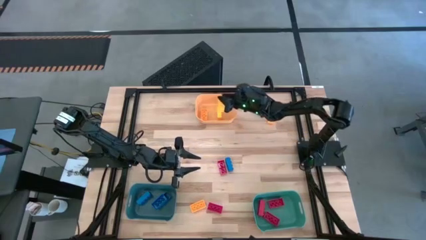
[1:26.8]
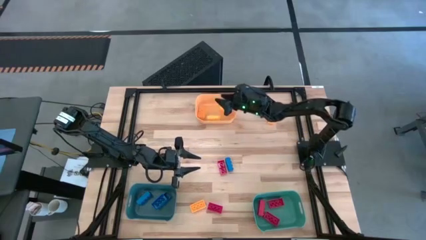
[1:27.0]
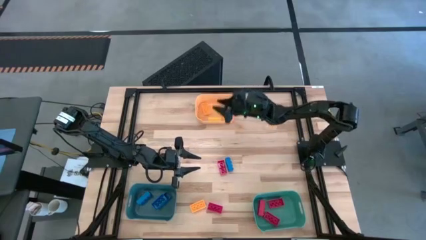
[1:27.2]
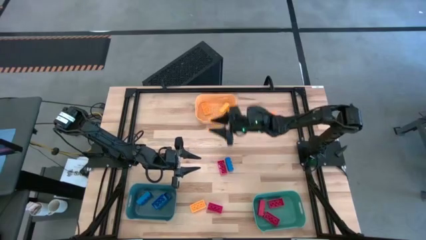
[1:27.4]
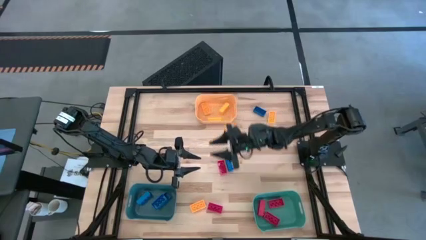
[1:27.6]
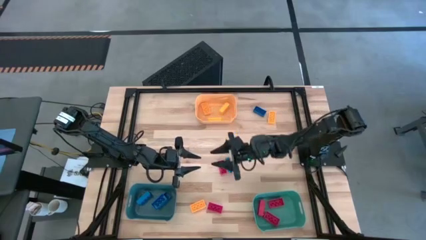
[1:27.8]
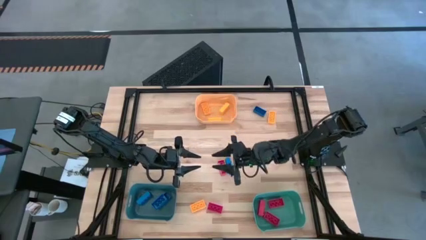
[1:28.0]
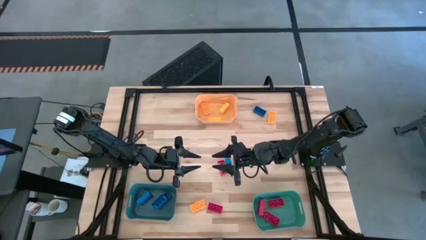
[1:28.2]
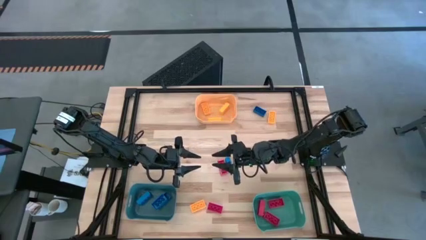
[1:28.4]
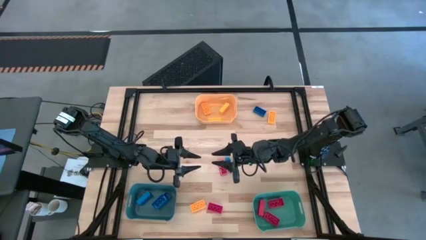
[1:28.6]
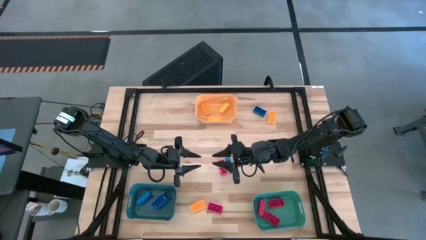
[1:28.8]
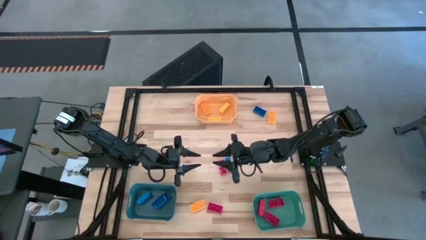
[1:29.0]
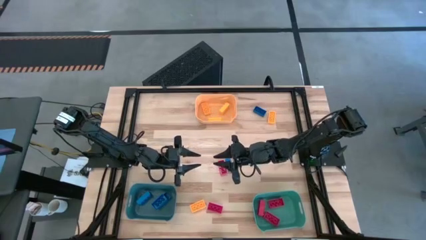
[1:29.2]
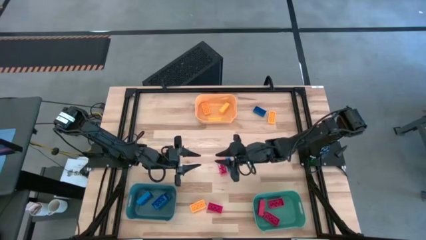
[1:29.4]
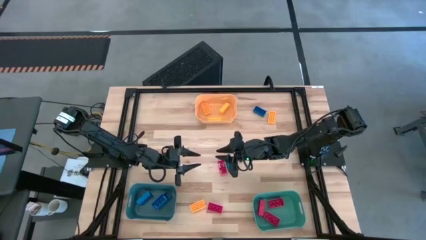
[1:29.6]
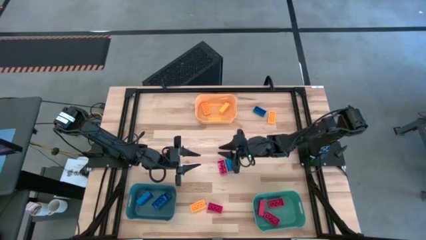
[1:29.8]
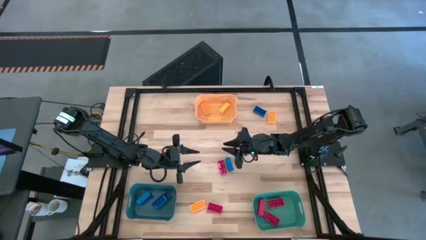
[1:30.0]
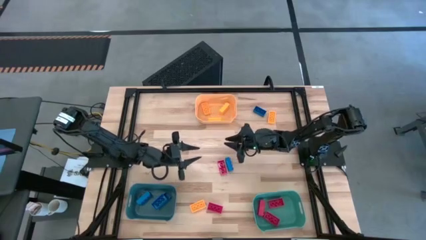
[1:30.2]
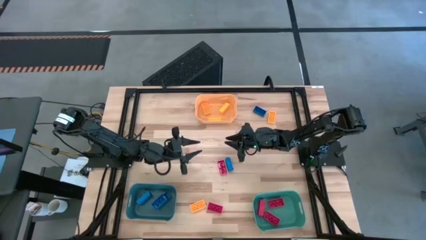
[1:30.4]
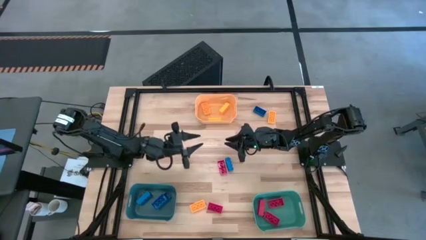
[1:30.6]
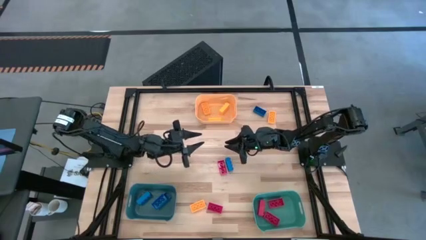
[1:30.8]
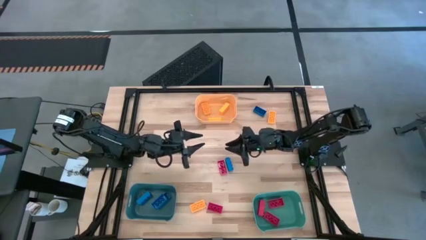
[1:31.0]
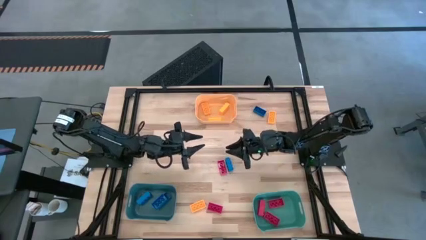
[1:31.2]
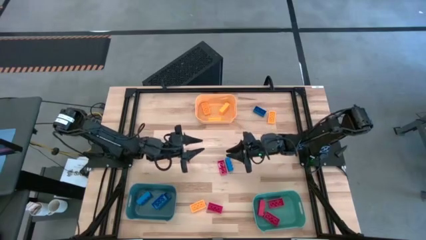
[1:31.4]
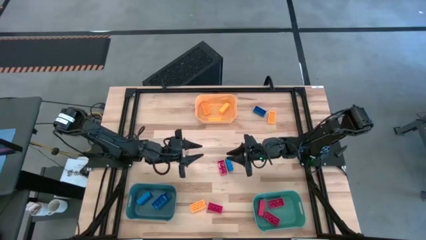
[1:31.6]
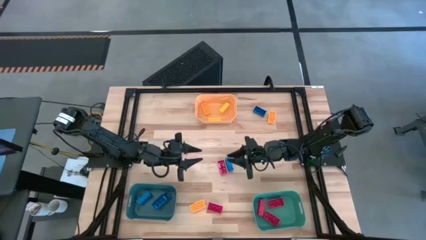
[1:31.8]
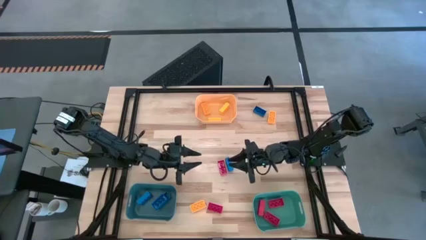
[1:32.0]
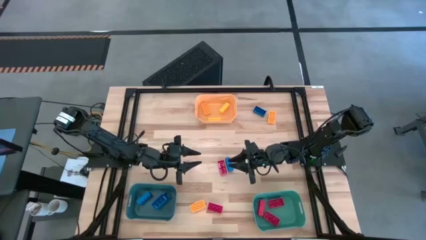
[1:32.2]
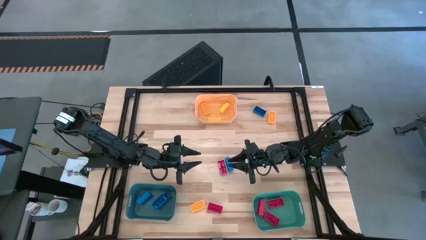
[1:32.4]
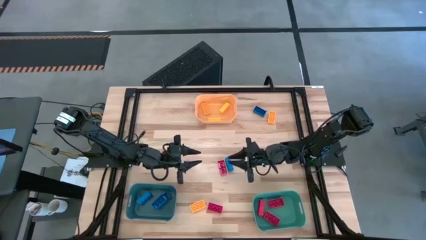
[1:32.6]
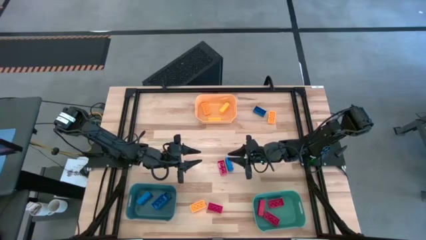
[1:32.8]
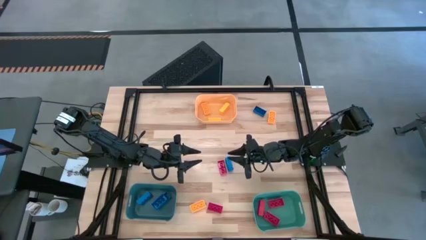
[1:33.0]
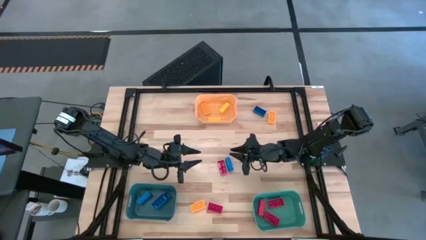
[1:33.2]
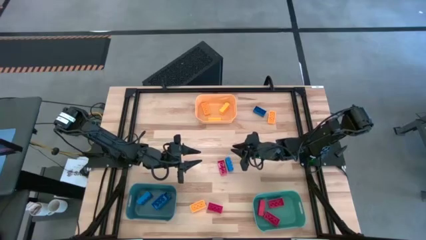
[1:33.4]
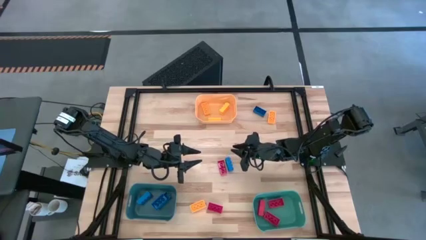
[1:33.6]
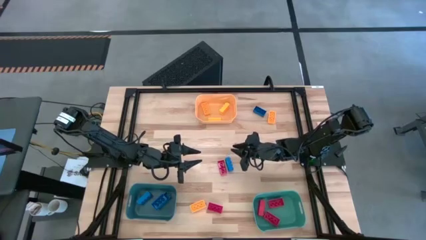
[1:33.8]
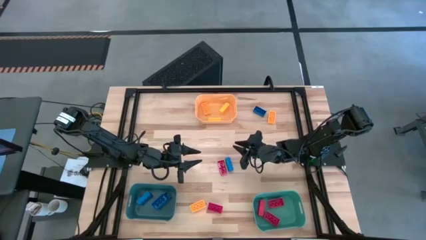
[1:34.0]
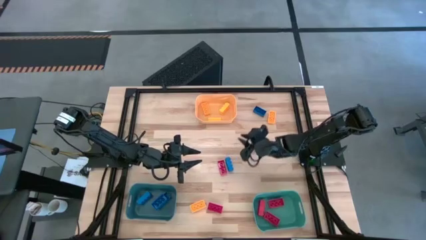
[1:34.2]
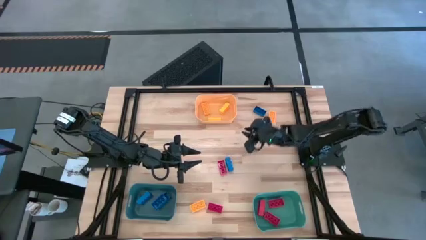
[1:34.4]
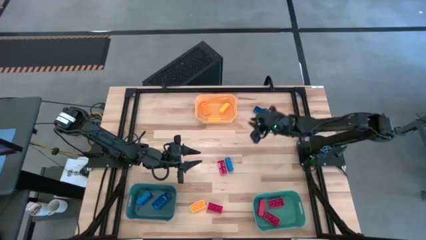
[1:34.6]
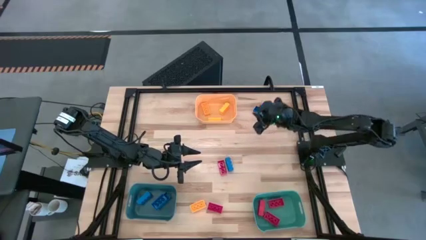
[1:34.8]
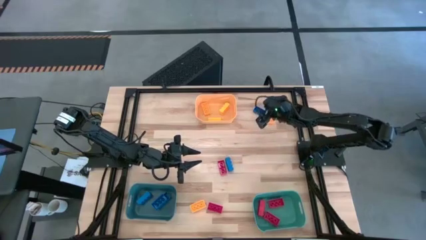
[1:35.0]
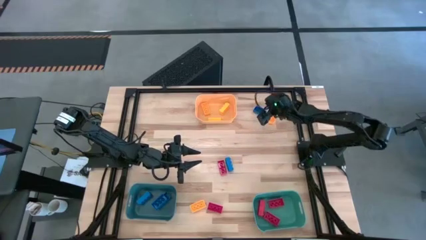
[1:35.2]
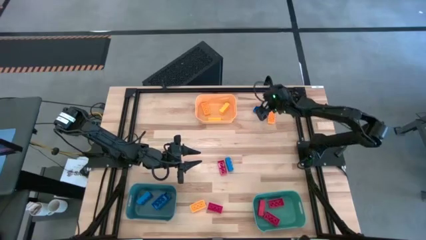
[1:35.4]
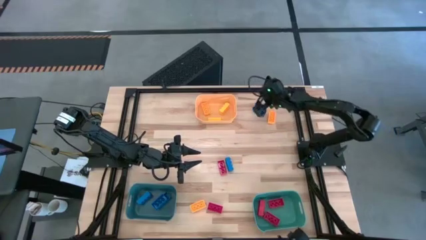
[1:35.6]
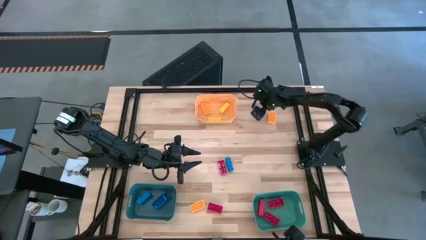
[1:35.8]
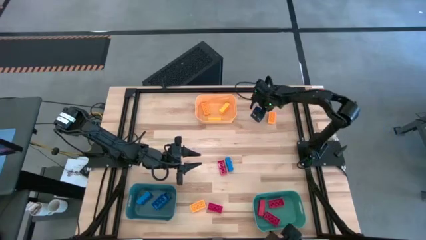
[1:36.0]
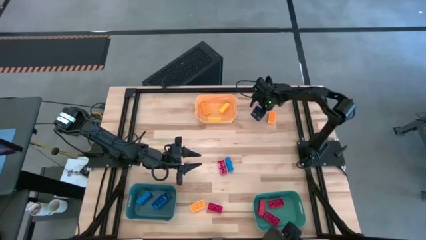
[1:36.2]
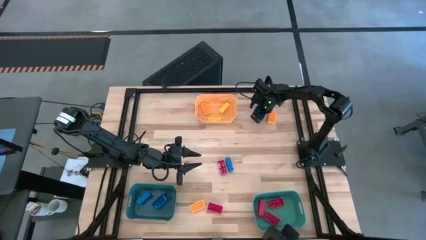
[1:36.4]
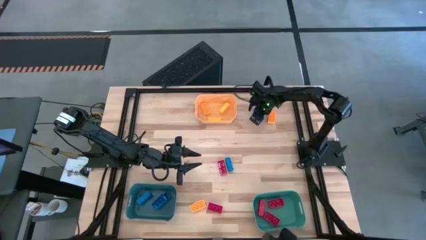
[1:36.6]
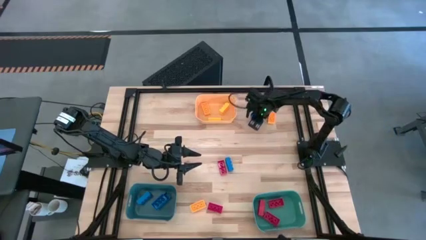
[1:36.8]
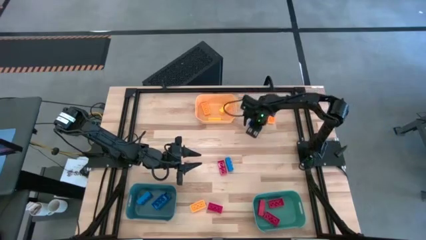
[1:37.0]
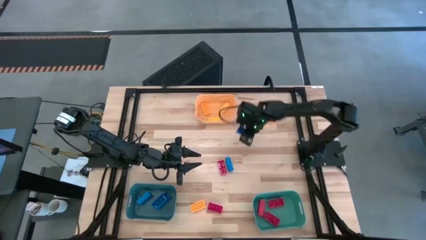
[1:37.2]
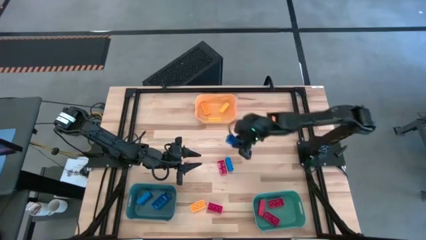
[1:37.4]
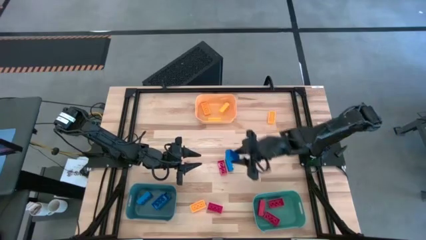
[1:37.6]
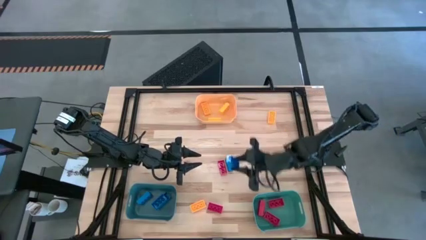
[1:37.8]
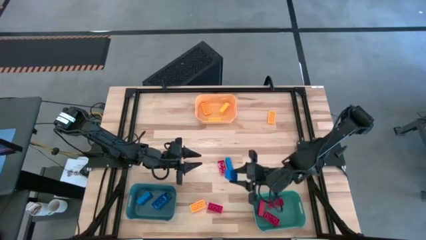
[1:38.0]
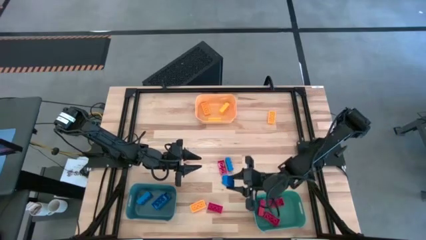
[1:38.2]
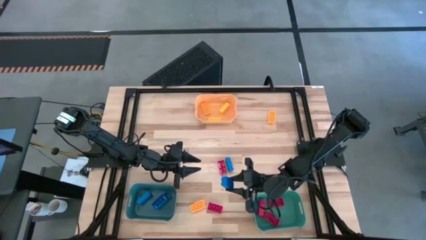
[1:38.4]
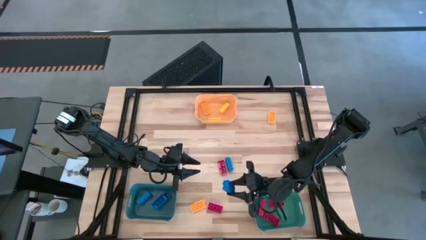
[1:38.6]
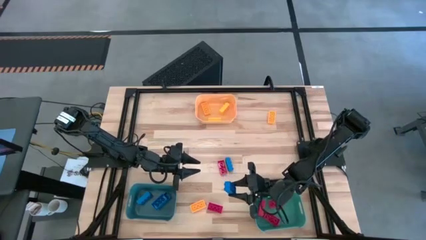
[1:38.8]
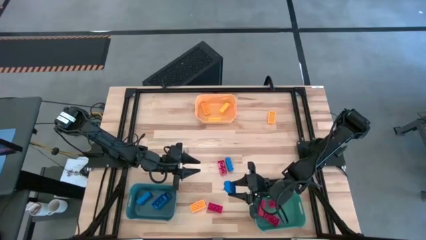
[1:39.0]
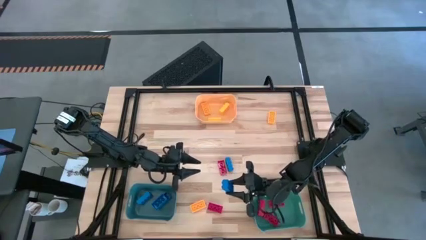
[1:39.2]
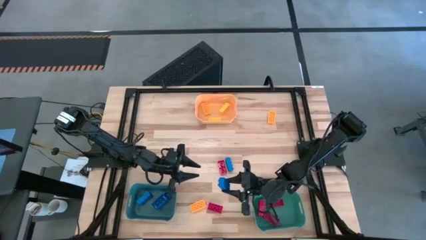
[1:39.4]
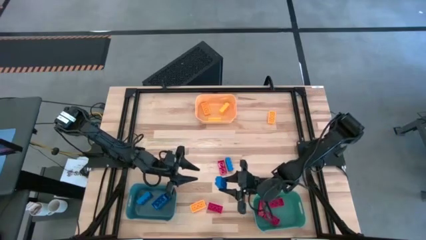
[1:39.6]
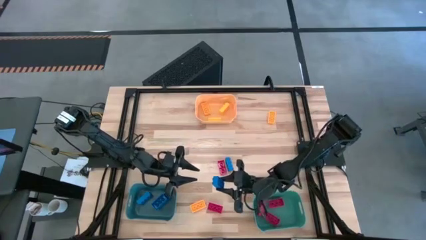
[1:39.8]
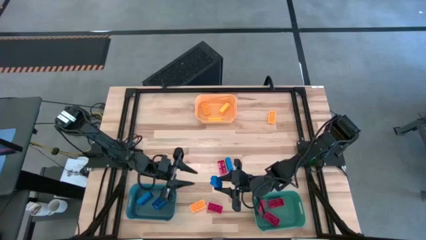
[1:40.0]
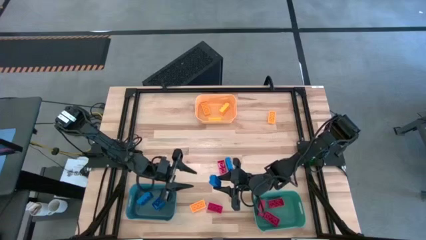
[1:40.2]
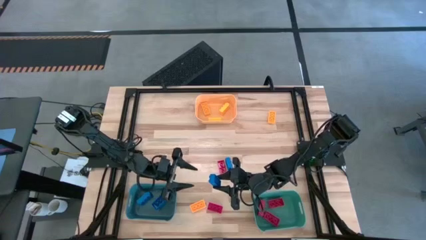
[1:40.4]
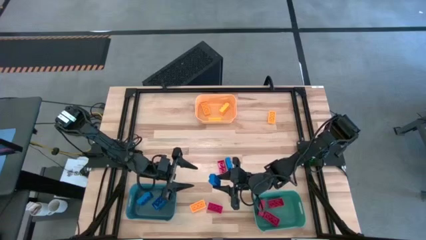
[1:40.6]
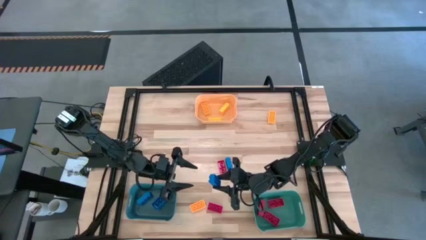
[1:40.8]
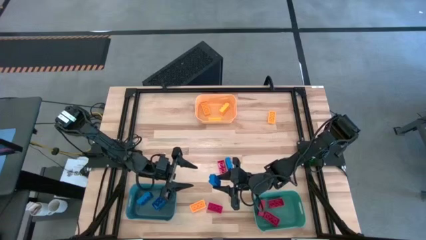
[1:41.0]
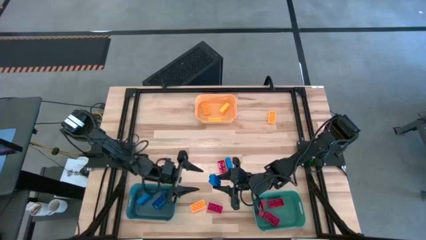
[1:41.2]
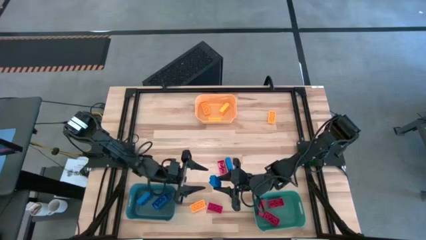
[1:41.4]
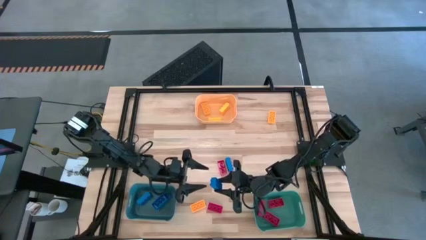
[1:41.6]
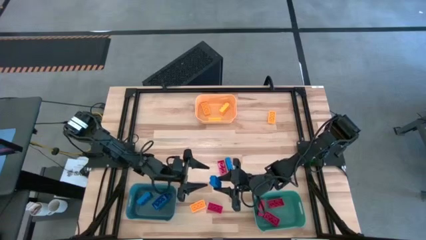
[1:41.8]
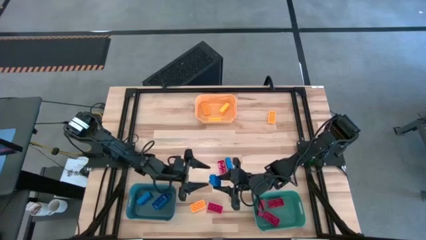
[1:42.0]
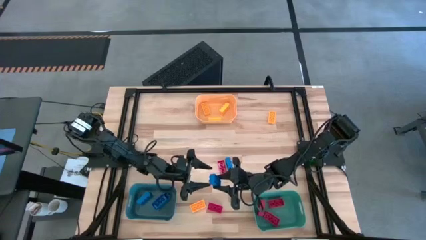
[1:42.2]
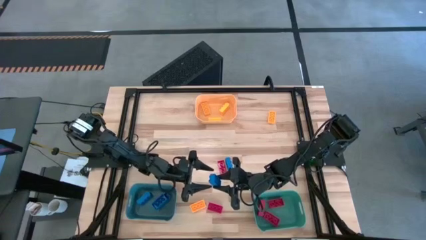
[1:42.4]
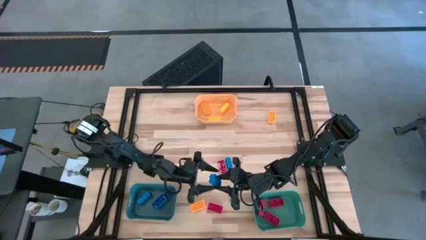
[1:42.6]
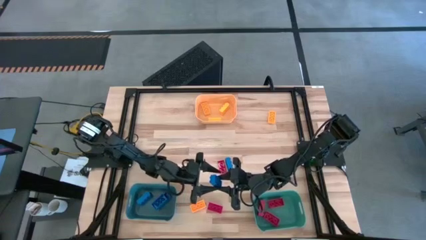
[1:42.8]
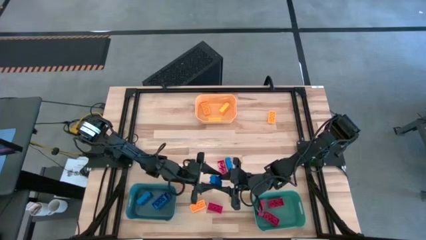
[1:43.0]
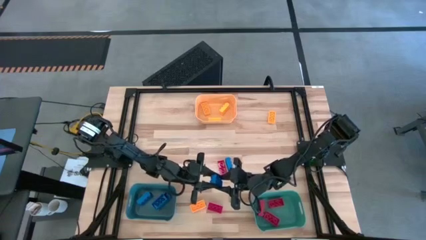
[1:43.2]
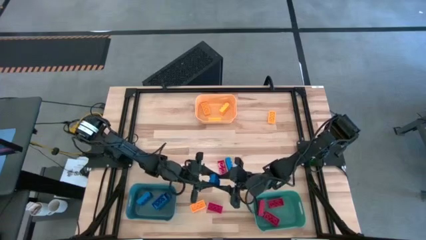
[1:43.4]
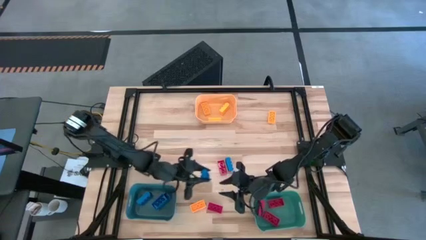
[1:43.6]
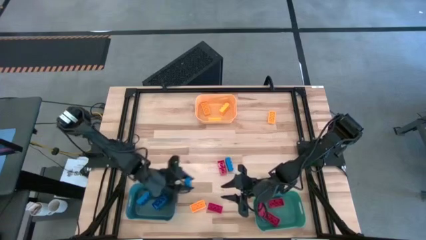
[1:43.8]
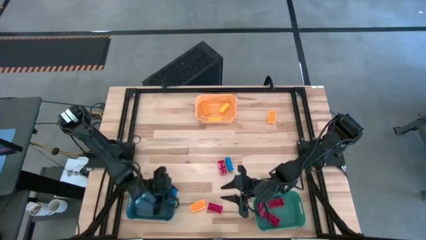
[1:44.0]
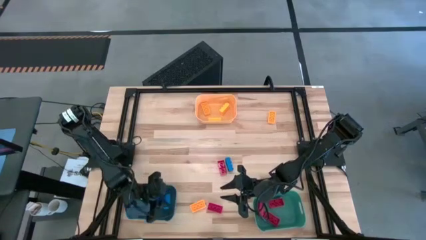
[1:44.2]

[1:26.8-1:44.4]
Task: Sort & place blocks by color
Put the blue game piece into the blue bin
